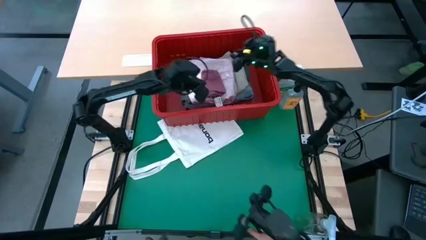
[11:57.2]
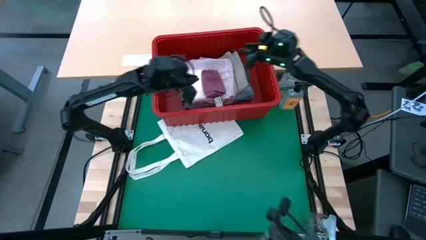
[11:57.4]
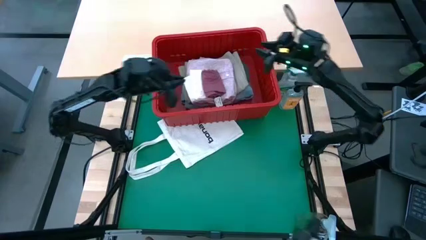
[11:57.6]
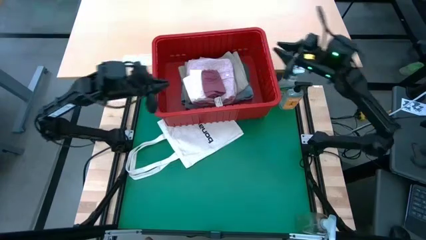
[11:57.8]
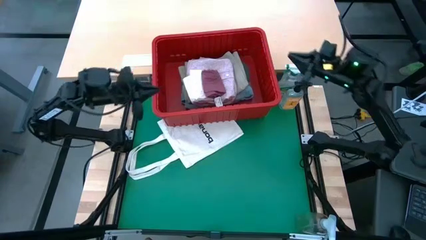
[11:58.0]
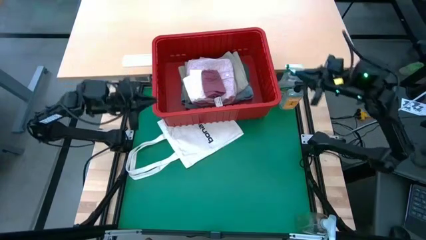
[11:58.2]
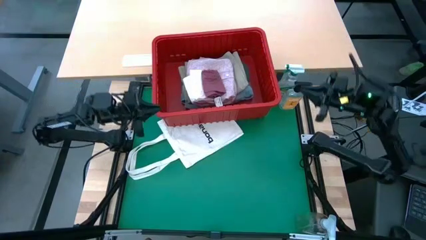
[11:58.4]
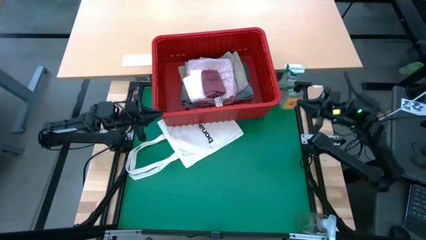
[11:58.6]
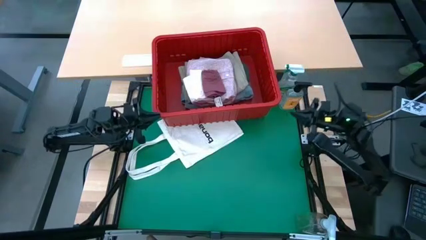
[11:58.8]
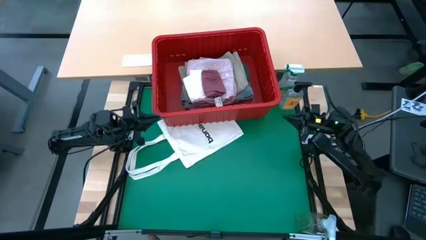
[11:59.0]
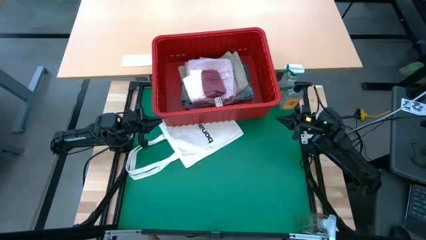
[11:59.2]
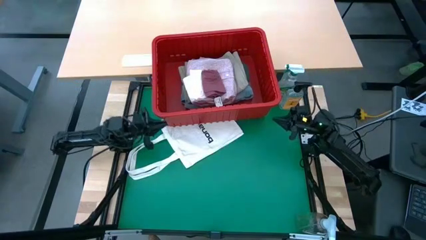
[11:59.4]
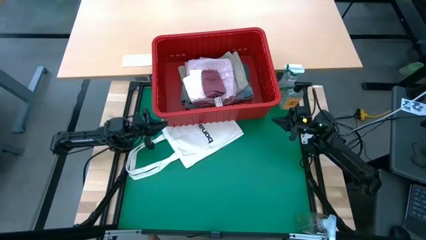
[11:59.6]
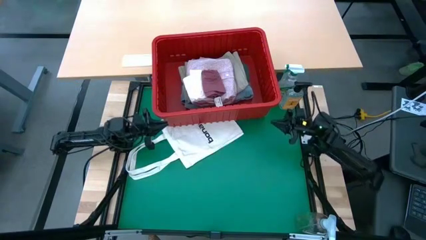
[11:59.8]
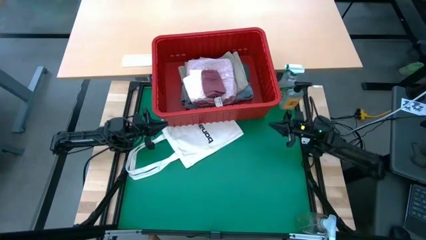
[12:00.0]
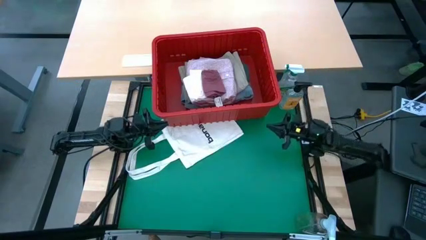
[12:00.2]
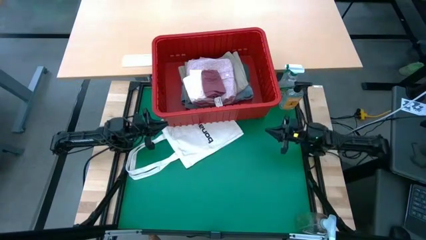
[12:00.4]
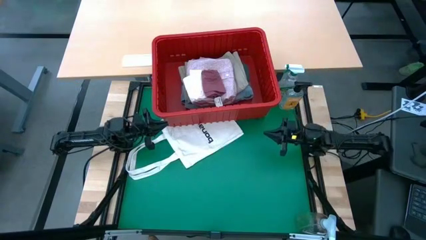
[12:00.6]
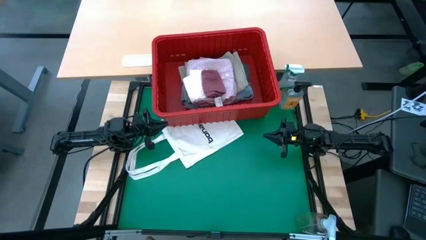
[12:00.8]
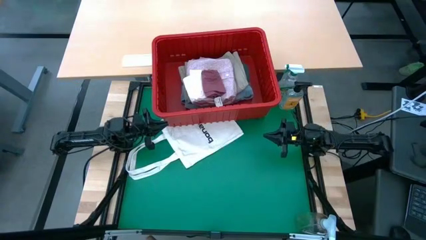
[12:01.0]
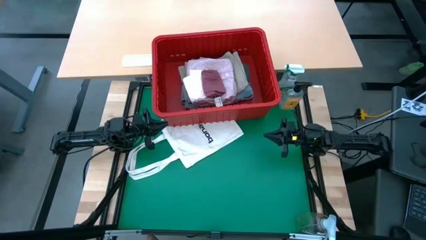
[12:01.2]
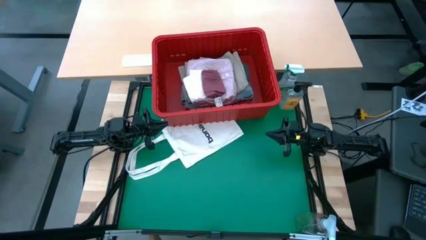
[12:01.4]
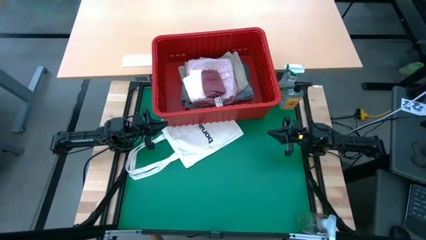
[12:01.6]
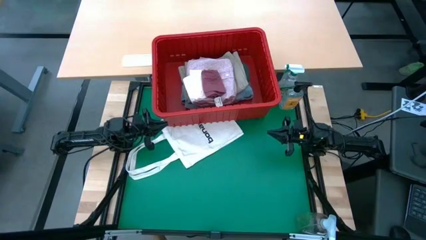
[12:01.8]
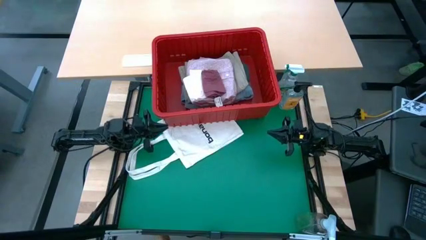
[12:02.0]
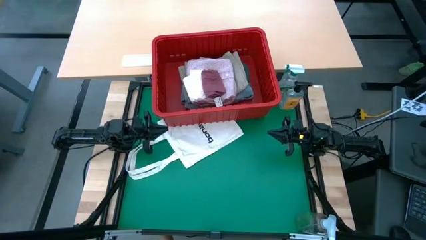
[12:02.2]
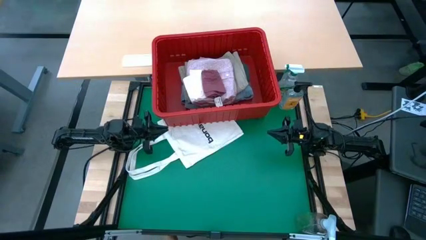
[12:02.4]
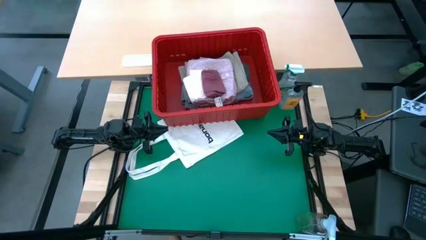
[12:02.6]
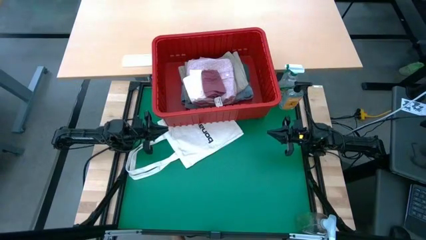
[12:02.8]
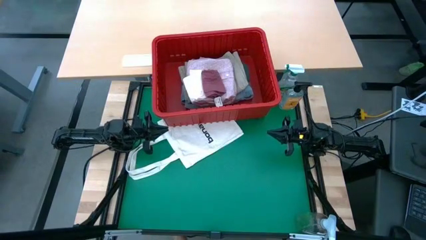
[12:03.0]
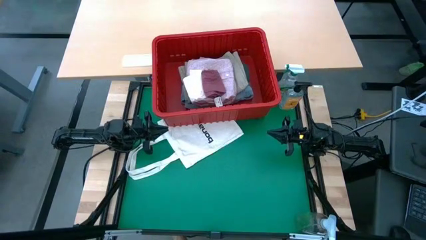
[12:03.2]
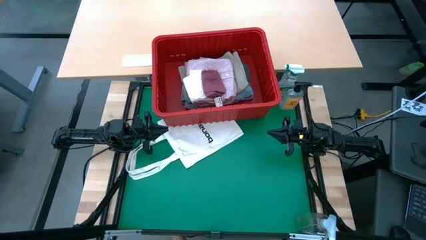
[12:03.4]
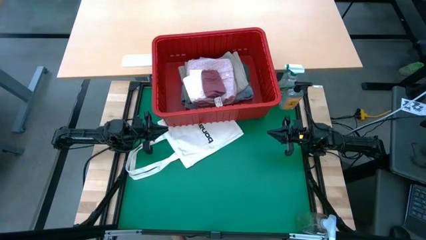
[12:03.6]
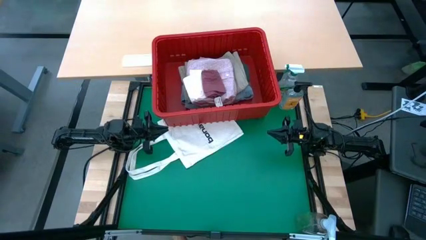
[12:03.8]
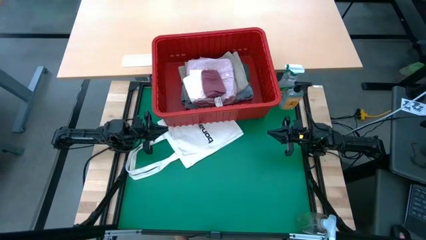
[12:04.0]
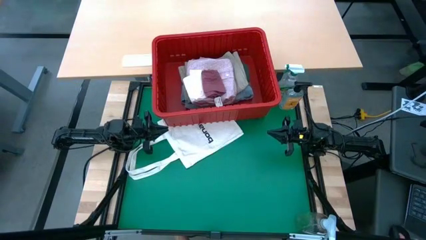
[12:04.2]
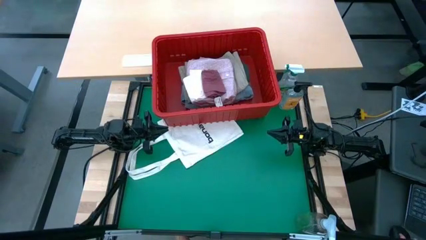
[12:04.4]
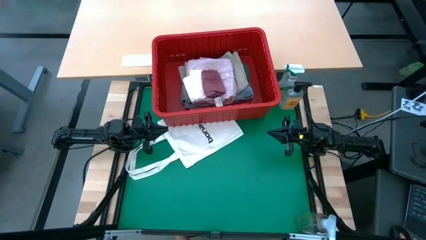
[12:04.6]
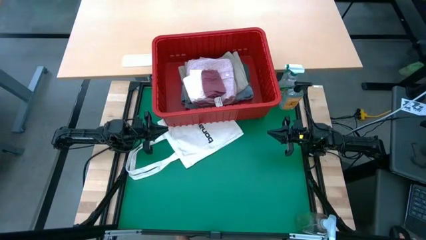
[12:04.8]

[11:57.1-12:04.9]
Task: Fold laundry
Return to Home Position

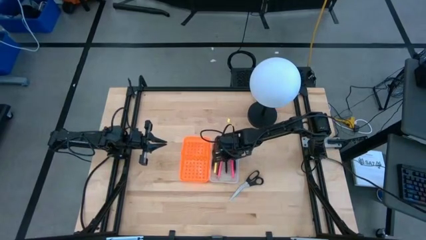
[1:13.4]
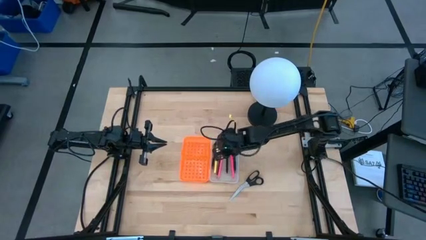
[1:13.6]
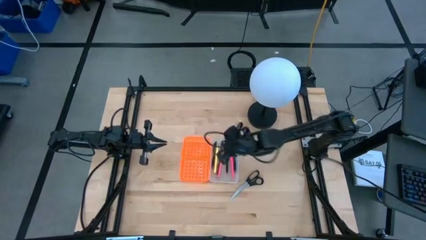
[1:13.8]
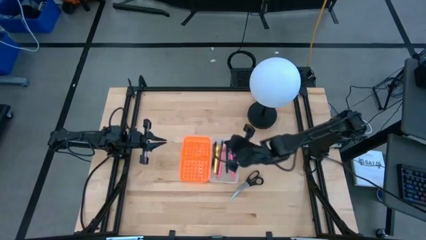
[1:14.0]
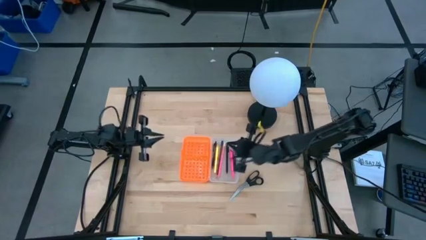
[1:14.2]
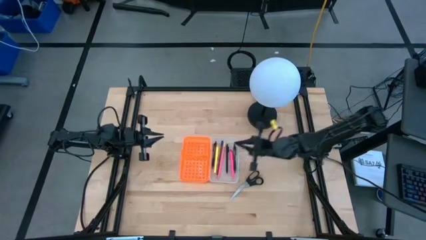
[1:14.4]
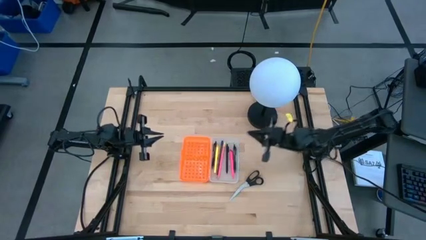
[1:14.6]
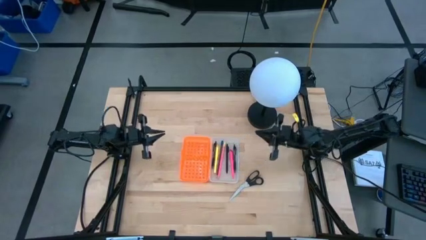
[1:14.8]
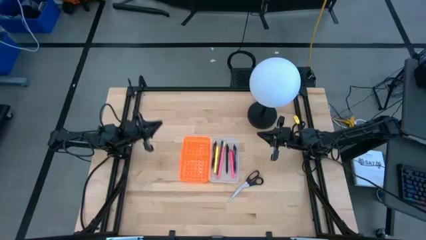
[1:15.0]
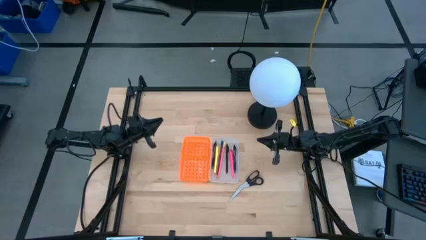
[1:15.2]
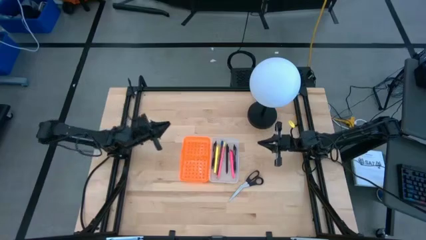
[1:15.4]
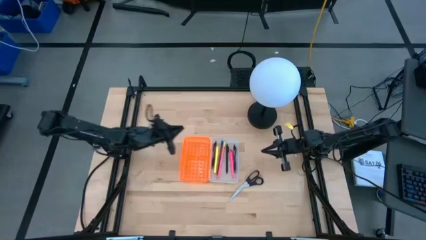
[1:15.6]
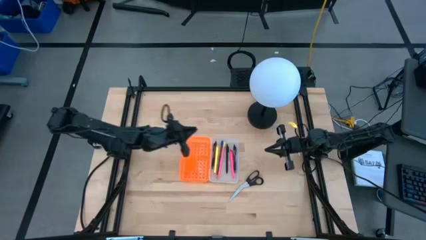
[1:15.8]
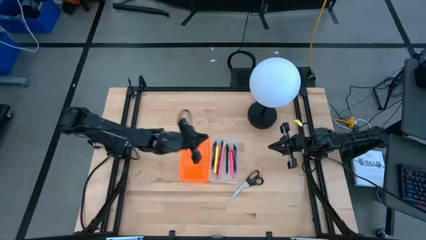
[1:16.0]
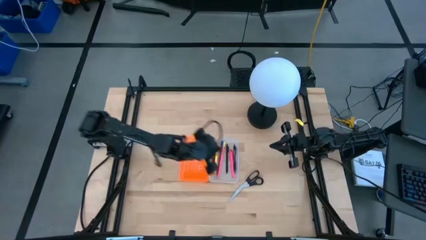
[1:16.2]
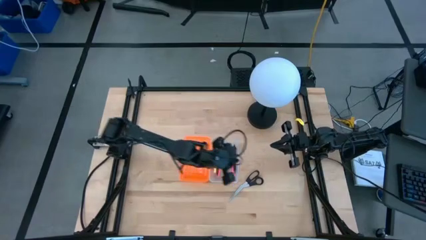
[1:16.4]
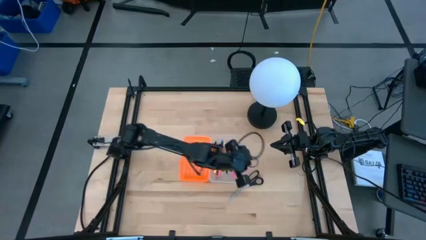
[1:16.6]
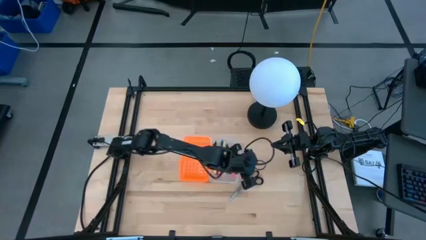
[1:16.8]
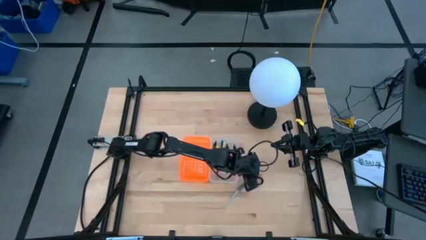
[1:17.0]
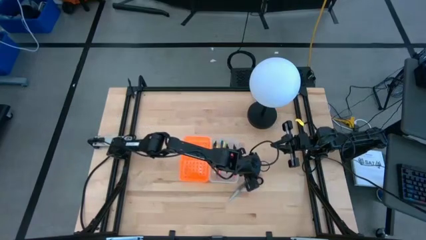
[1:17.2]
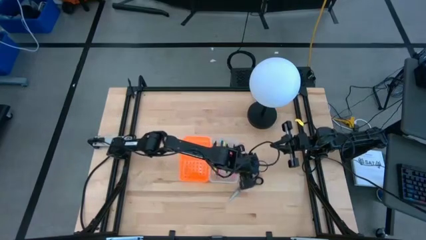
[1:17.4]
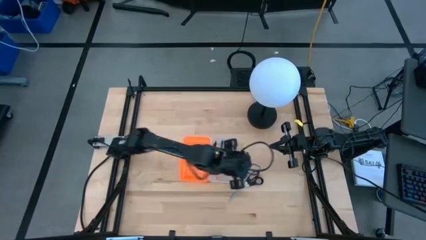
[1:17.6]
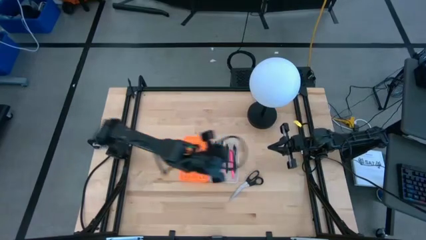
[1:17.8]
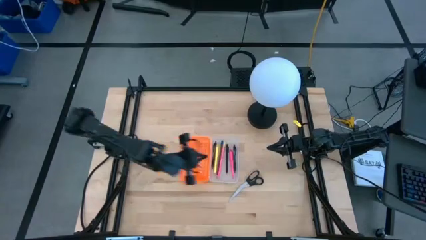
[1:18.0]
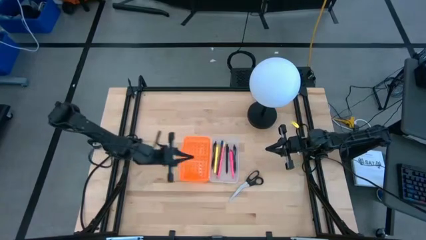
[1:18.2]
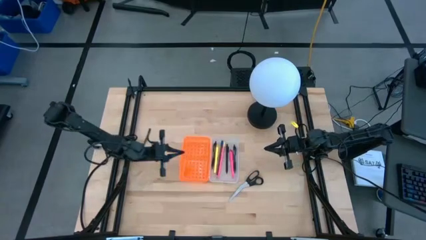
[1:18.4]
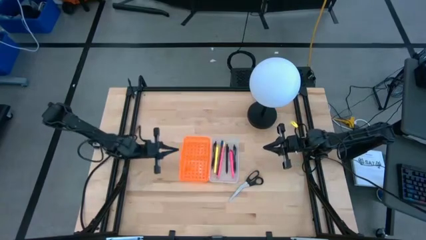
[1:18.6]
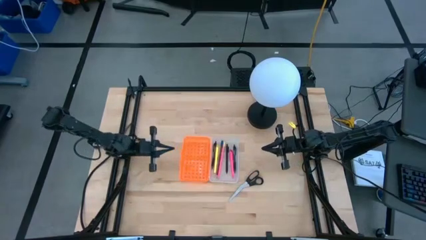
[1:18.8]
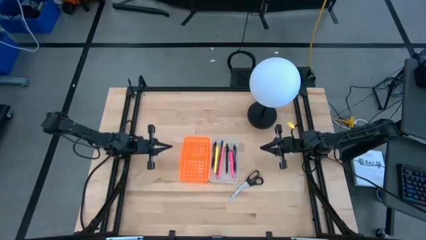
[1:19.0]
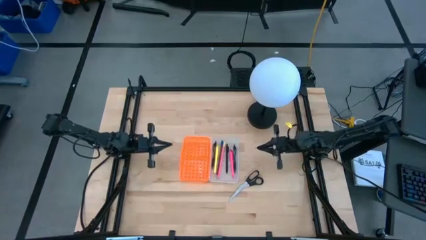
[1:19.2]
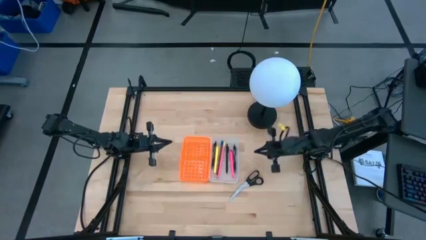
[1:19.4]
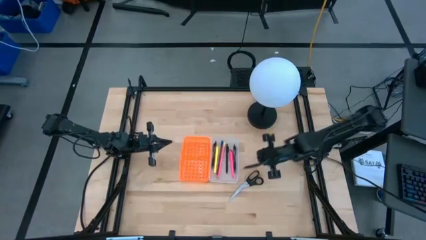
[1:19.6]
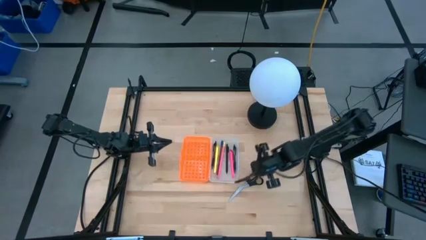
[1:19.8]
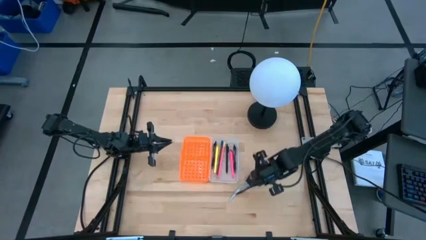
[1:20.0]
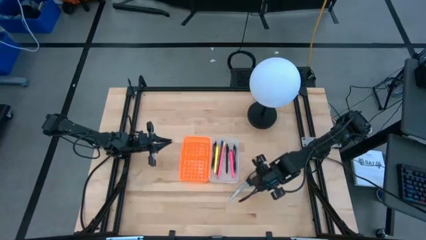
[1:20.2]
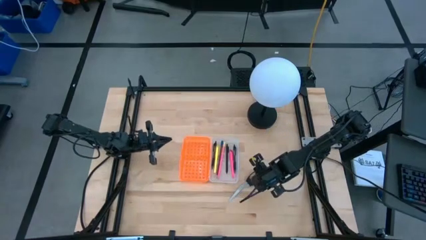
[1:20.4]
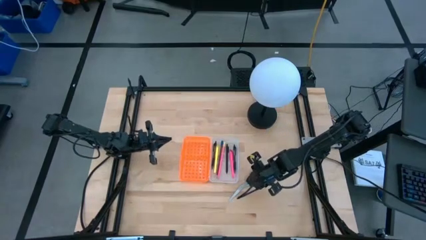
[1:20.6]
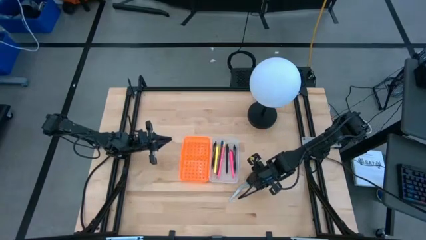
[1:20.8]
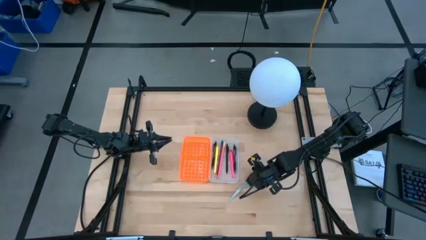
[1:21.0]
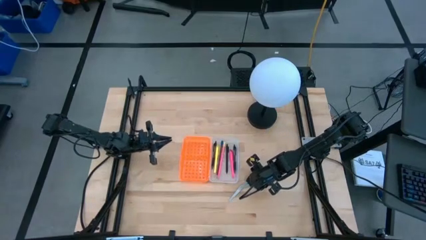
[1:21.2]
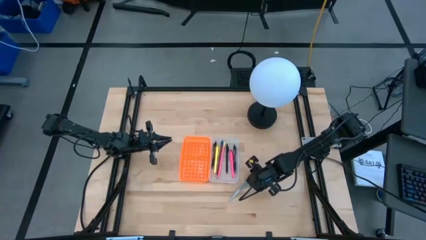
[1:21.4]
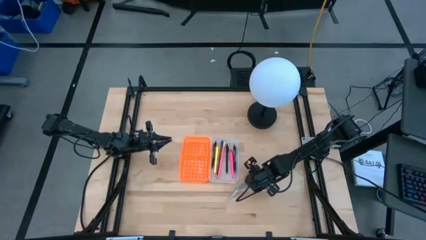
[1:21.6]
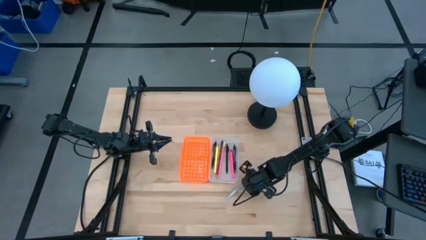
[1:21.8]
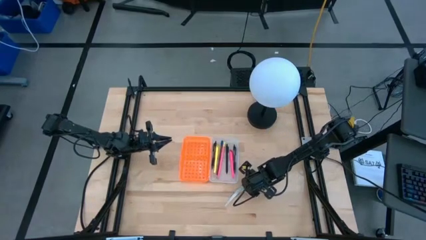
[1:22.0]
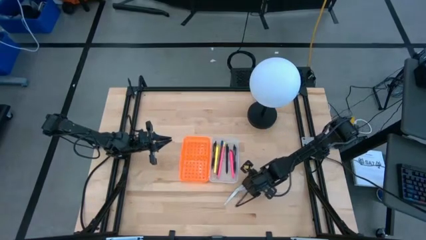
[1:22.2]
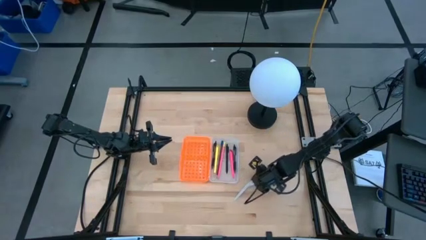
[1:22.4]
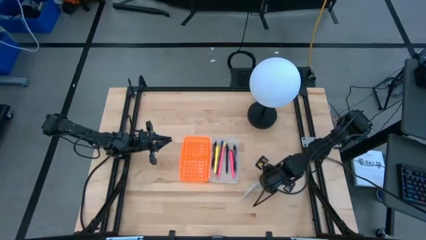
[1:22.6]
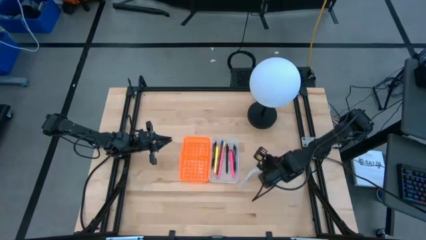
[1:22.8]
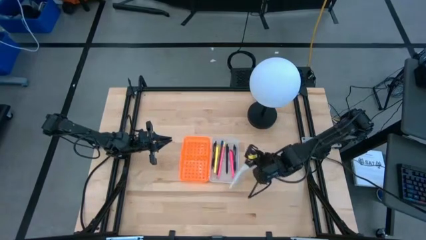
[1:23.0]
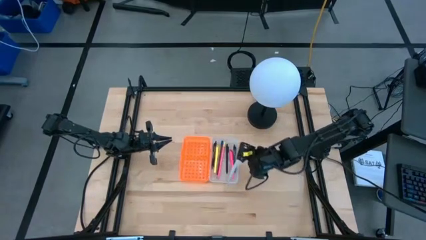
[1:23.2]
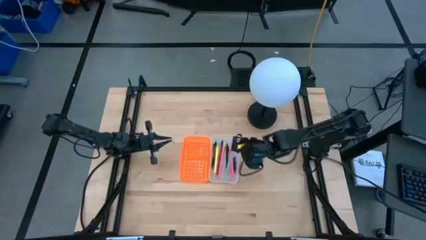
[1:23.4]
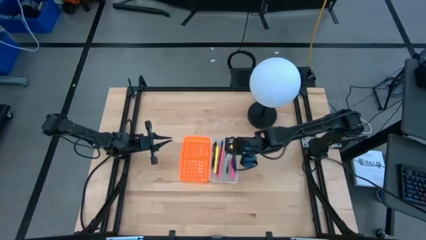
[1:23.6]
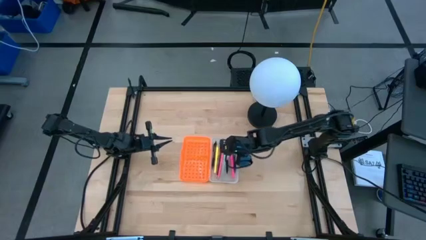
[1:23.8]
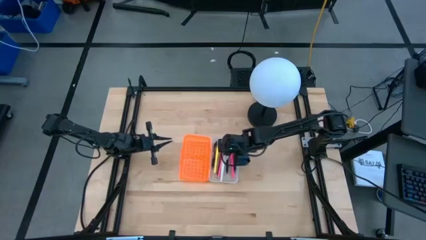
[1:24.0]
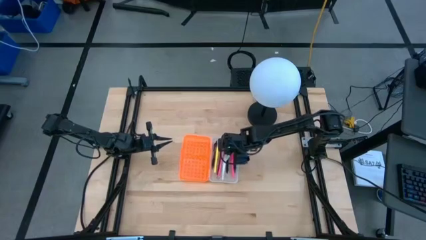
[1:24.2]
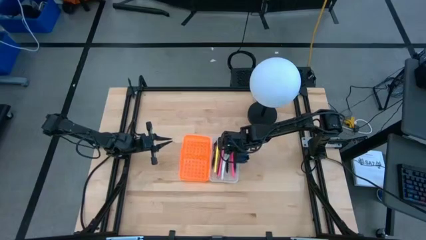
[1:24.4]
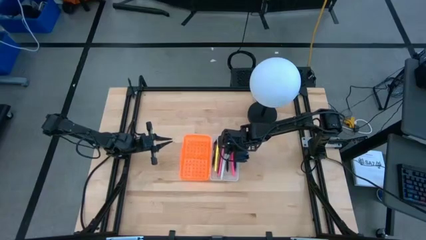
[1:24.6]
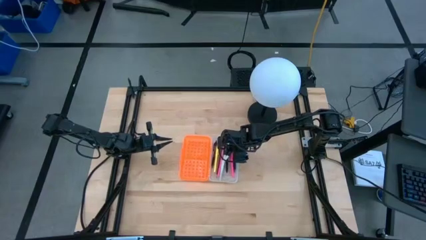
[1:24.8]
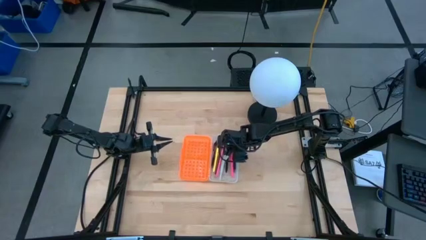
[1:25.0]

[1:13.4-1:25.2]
Task: Pick & place school supplies into a supply box
Put the black scissors into the orange supply box
